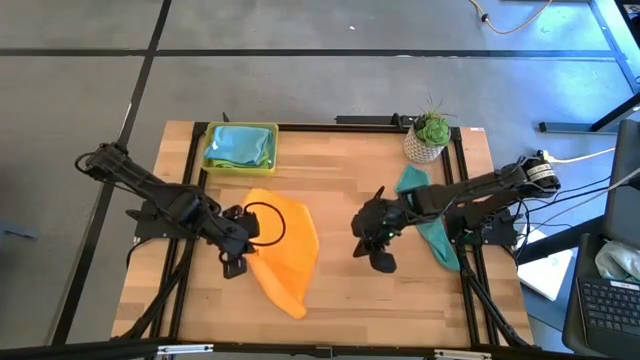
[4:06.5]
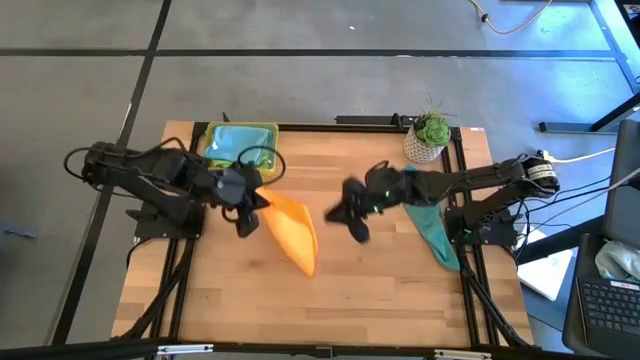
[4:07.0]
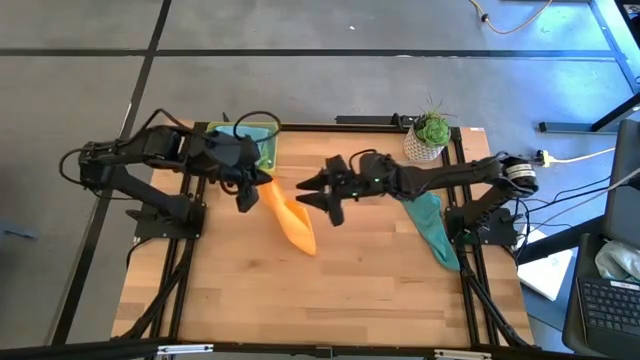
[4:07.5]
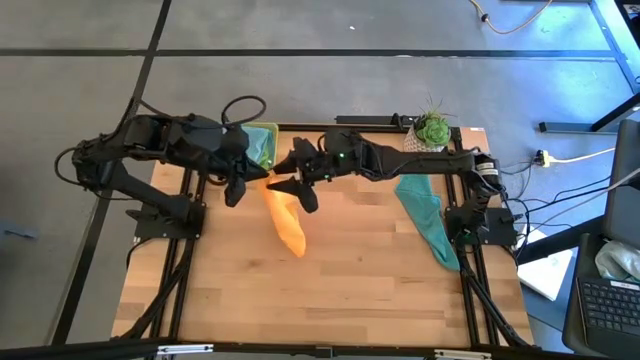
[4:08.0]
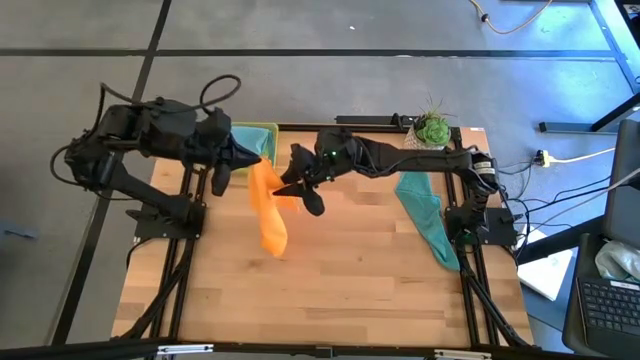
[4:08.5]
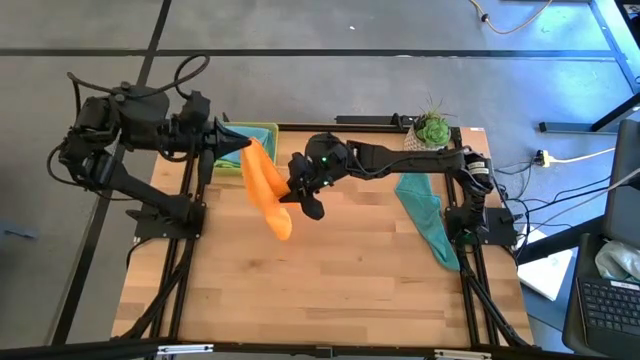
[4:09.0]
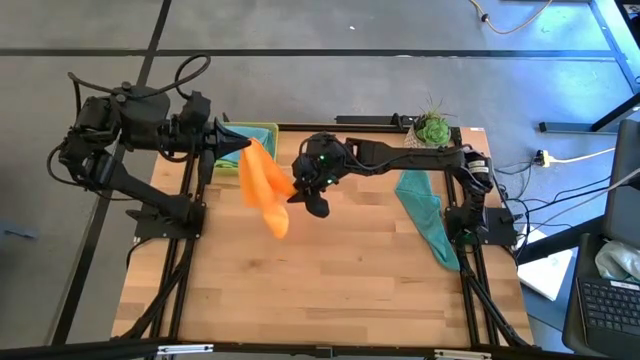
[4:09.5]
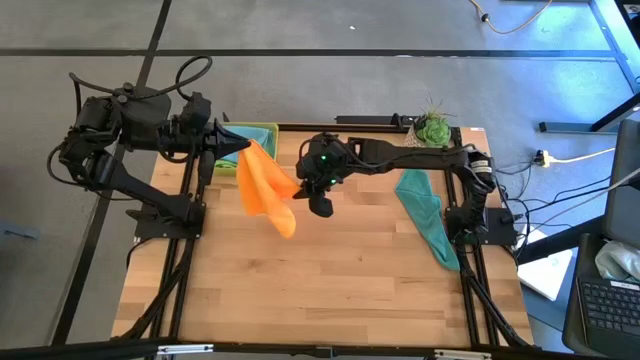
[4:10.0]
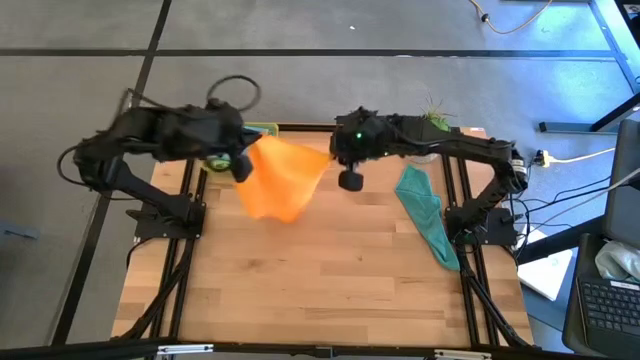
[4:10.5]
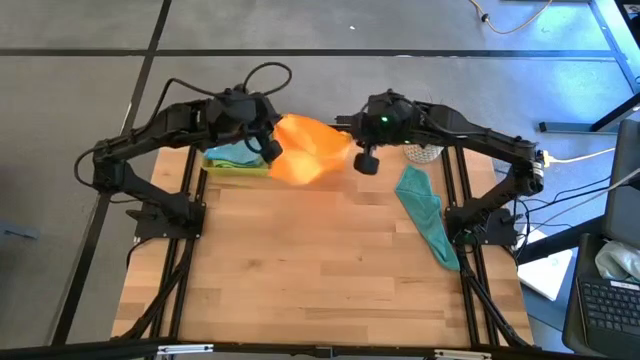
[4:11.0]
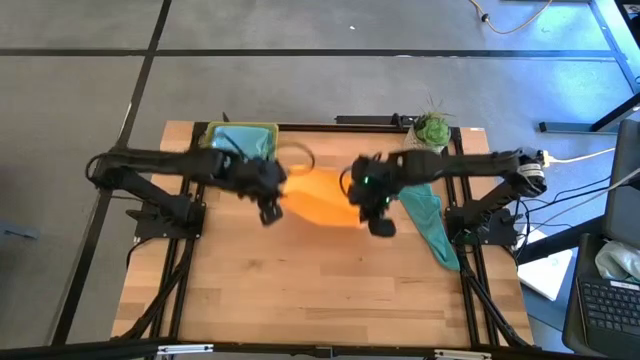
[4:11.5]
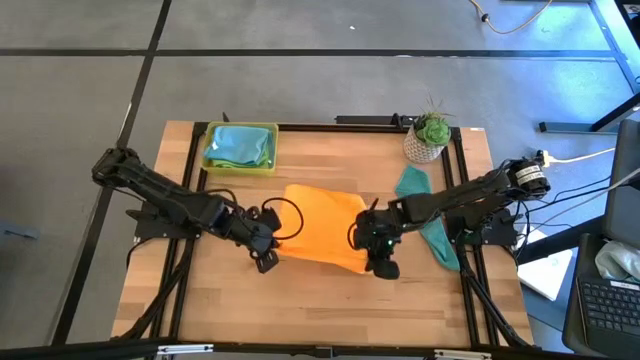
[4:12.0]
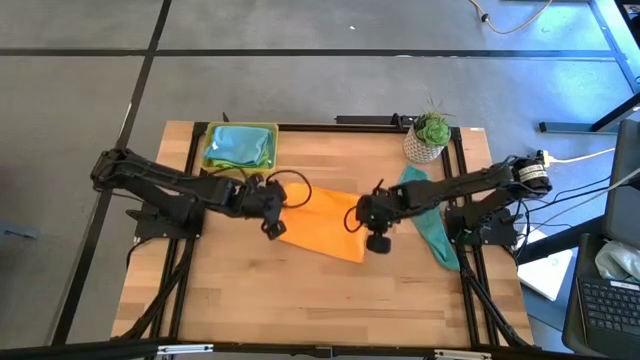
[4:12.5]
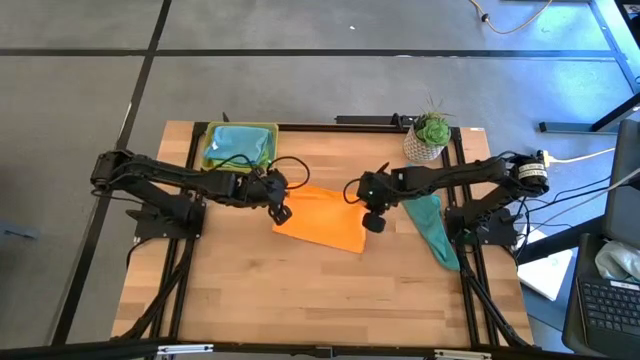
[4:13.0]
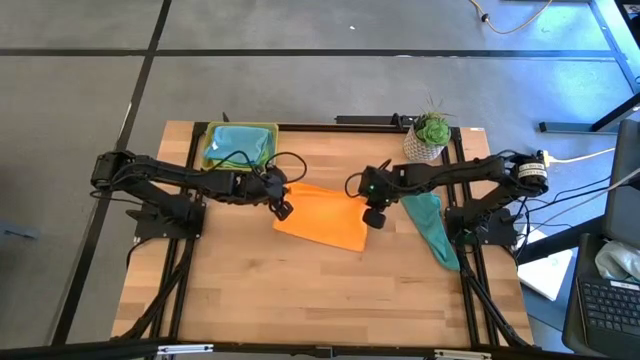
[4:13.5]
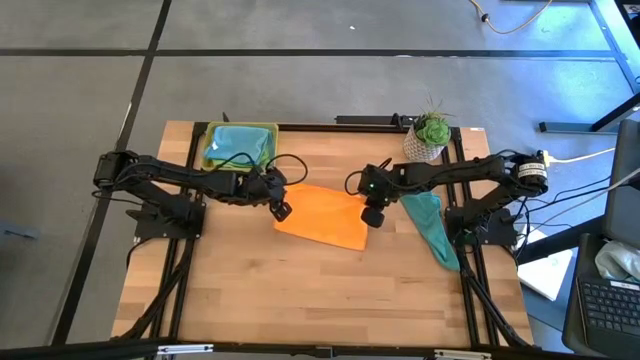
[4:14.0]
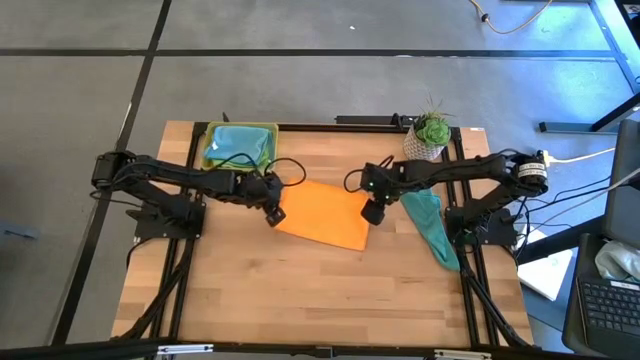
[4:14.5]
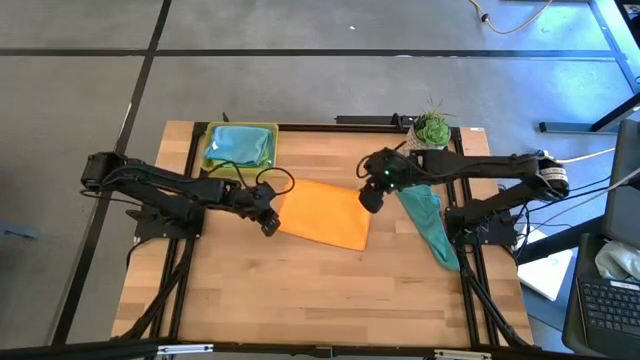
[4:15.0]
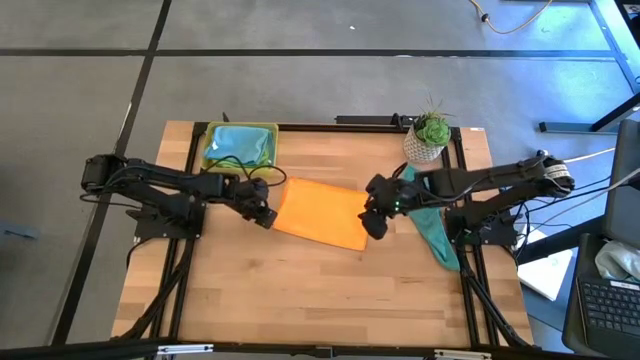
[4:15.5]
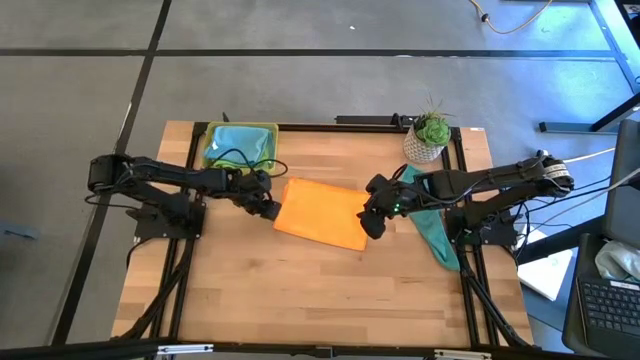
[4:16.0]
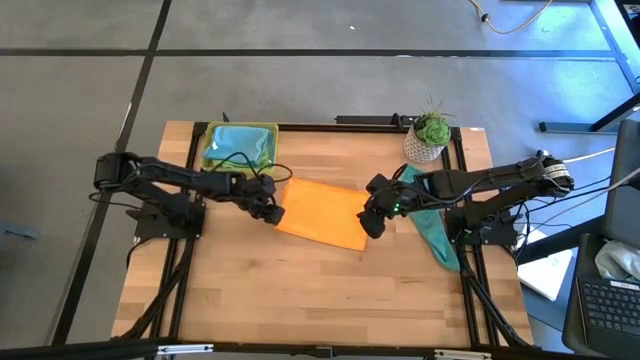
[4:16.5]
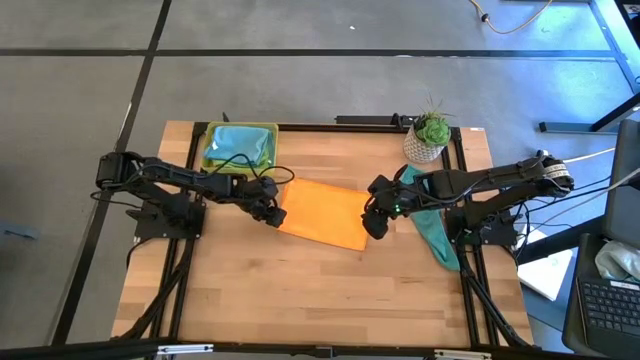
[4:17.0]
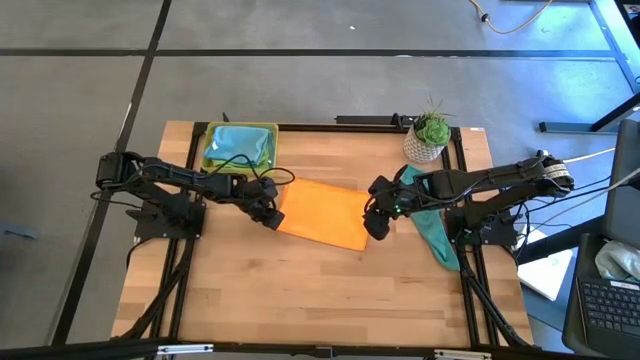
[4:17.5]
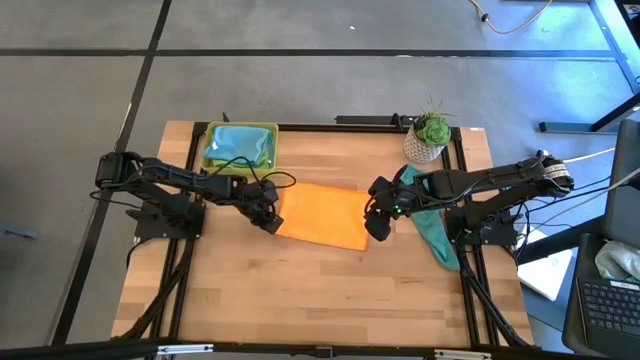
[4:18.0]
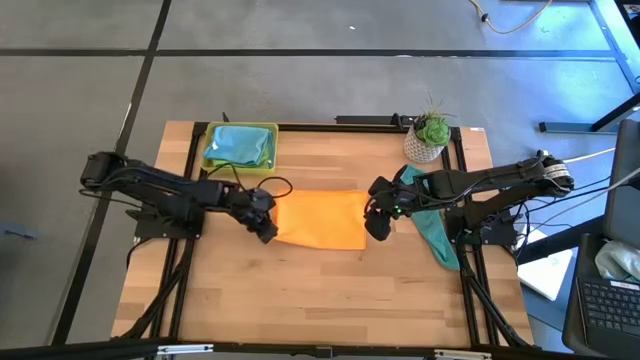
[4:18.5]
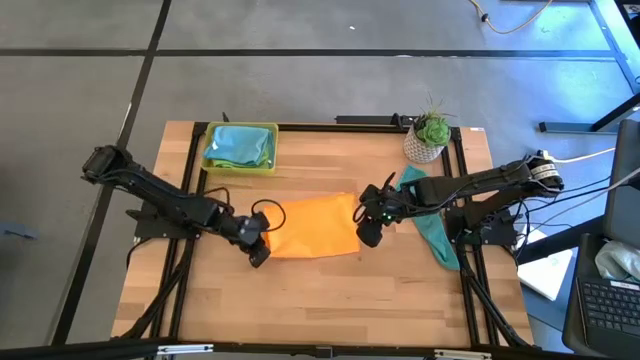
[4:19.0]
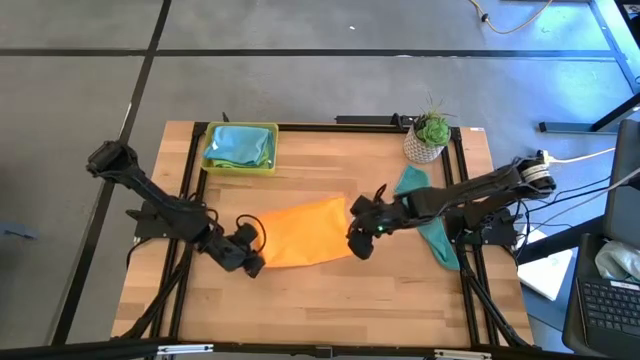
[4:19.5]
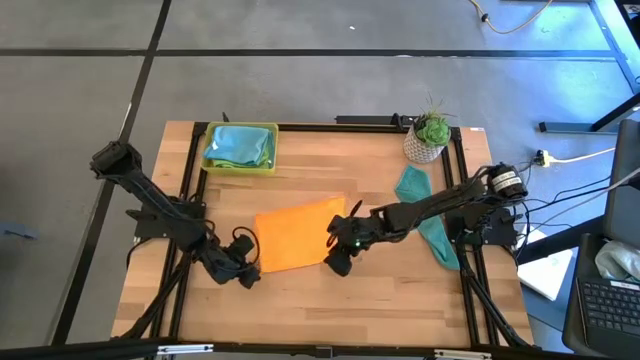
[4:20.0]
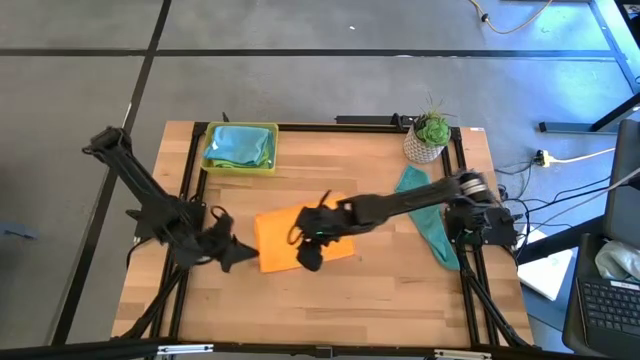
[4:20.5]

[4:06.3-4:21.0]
Task: Fold microfiber towels
Fold the orange towel

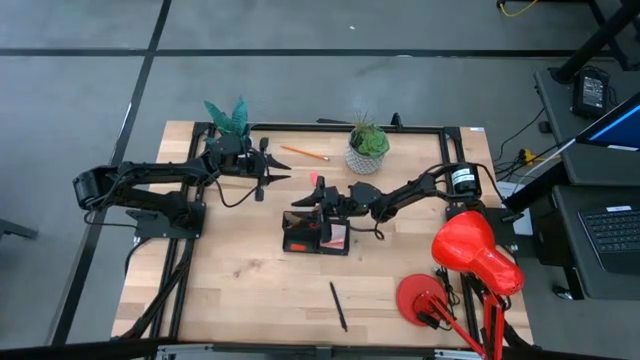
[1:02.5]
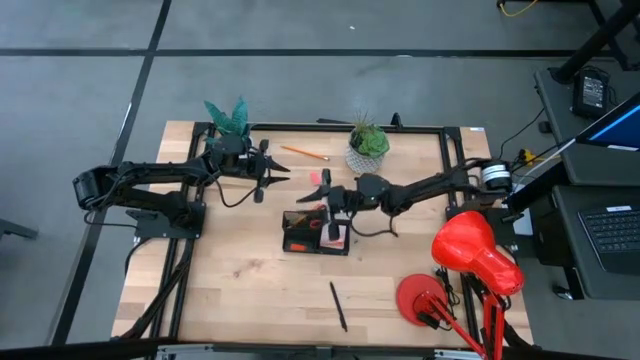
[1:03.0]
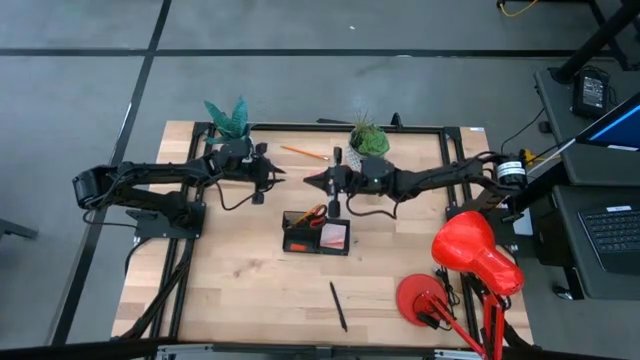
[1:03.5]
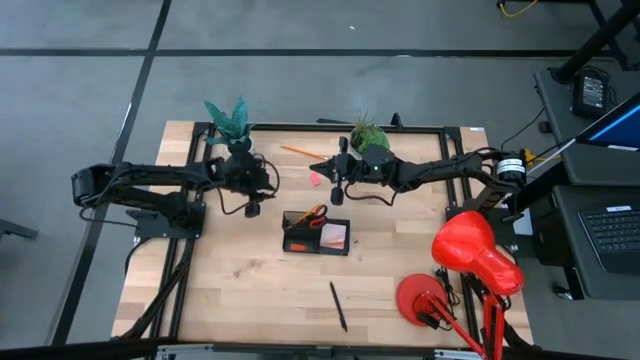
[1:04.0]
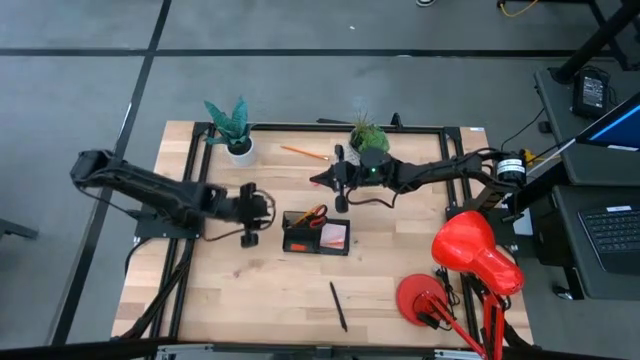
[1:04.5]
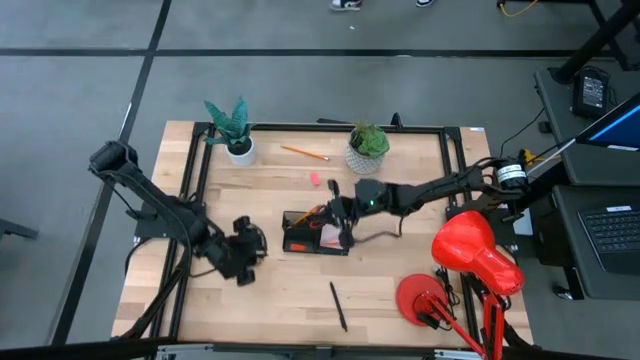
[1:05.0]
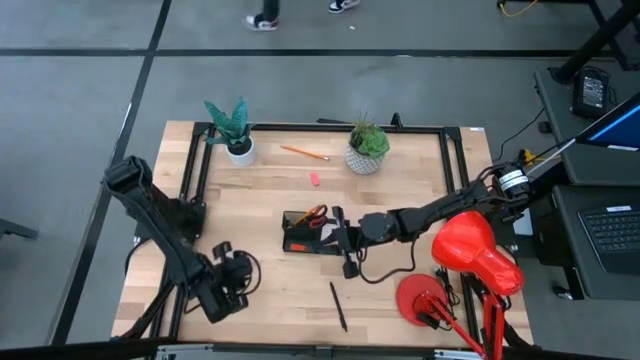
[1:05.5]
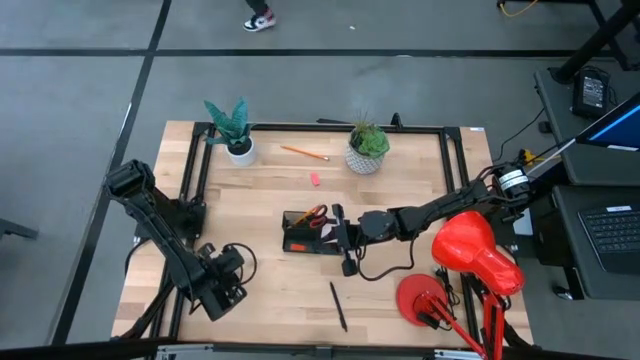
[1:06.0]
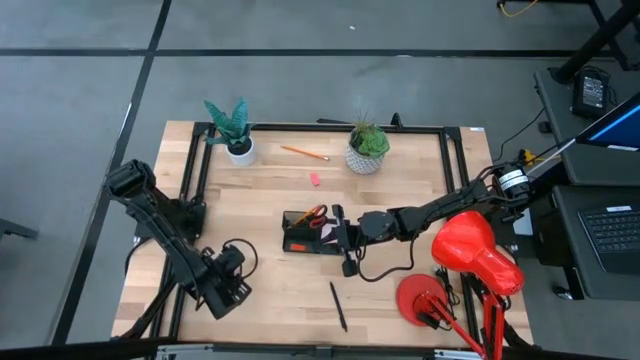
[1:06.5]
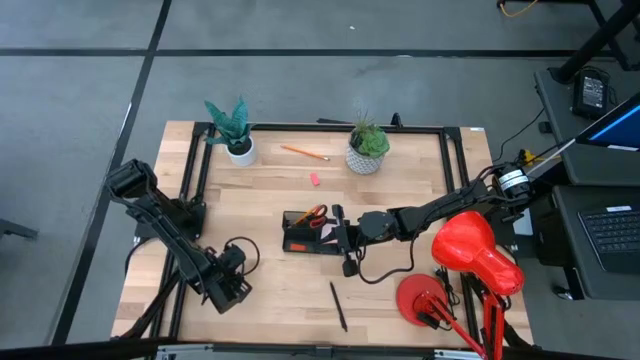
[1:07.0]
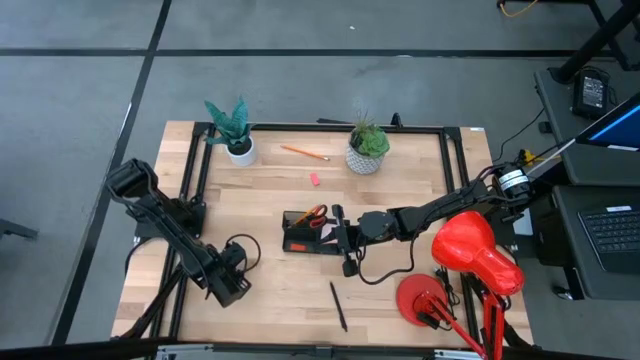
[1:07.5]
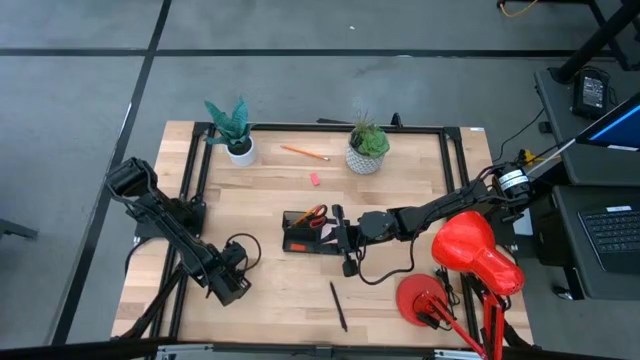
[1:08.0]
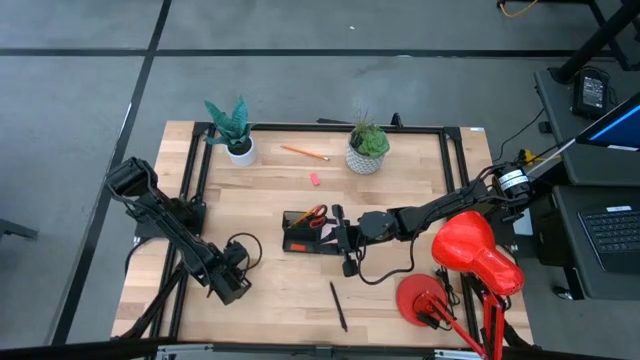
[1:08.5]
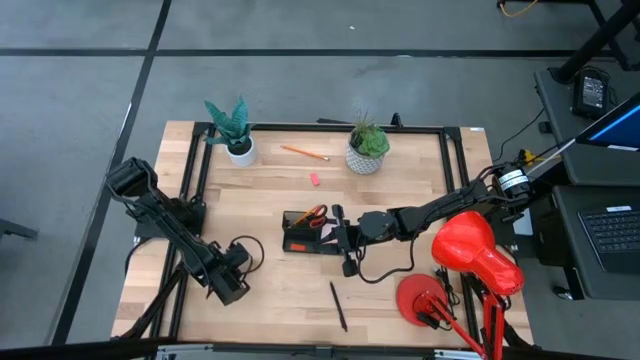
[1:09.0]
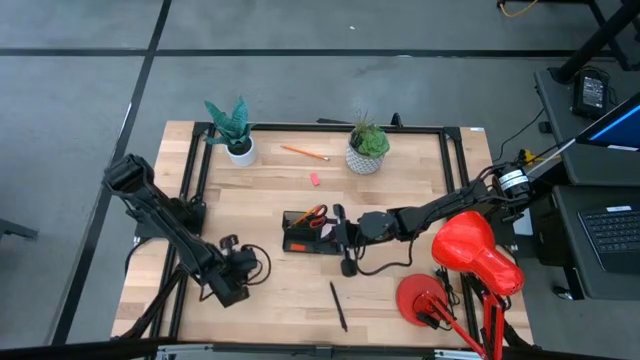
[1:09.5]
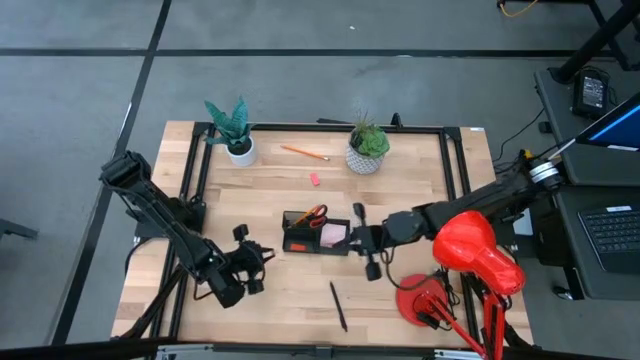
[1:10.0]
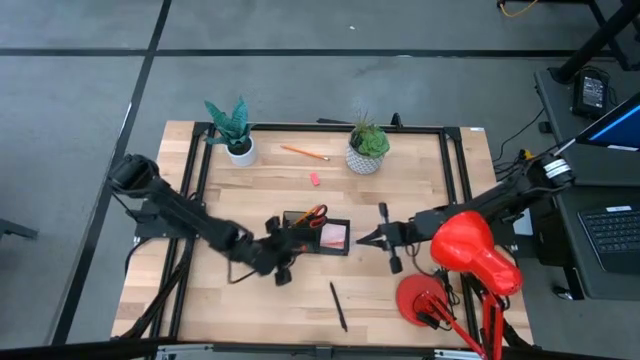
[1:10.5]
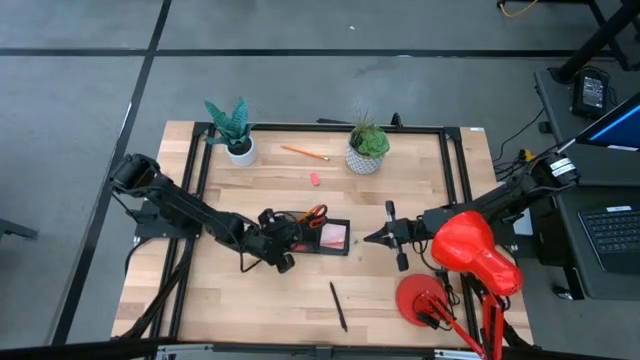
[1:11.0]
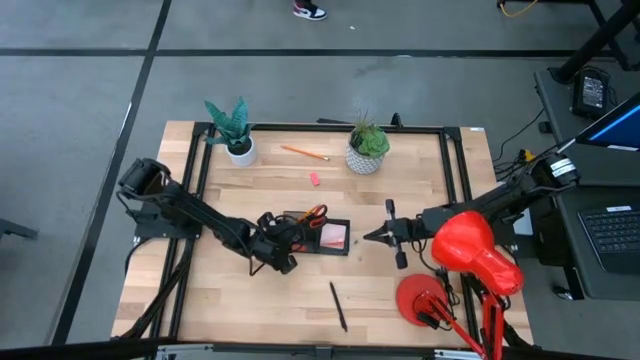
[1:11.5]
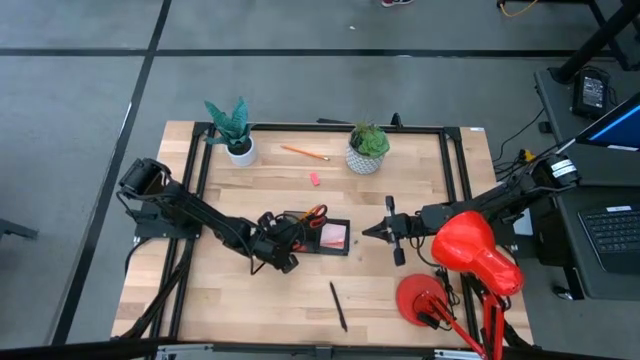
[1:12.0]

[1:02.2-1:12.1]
Task: Pick and place office supplies into organizer
Put the pink binder clip into the desk organizer
